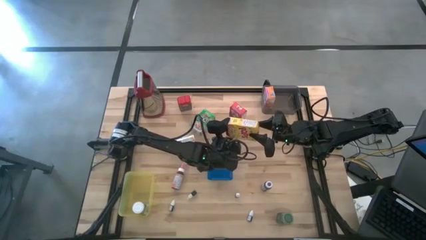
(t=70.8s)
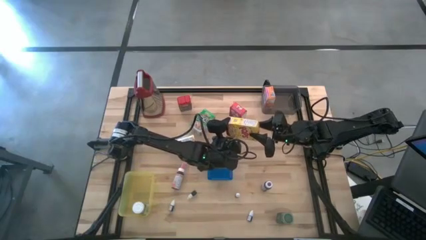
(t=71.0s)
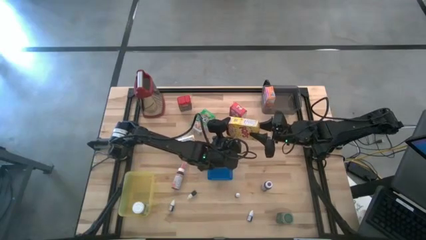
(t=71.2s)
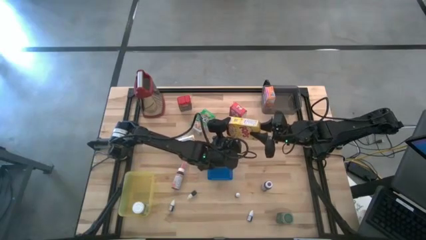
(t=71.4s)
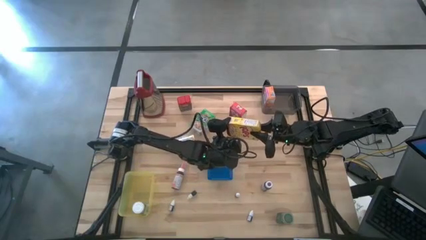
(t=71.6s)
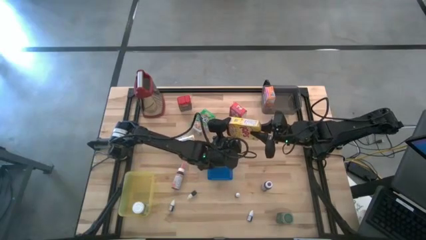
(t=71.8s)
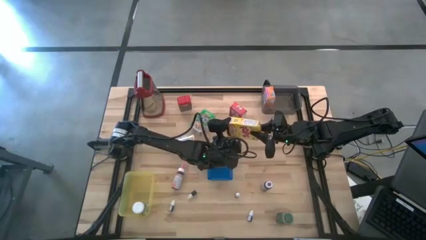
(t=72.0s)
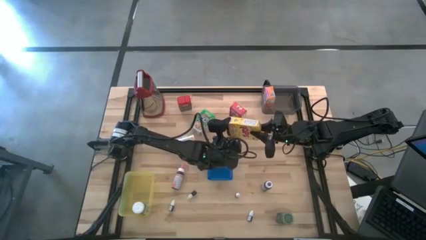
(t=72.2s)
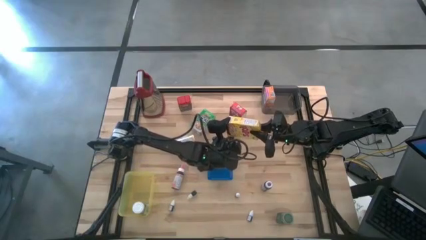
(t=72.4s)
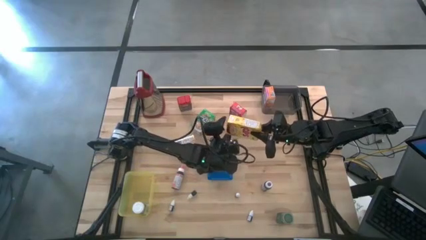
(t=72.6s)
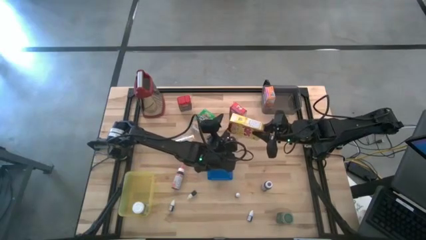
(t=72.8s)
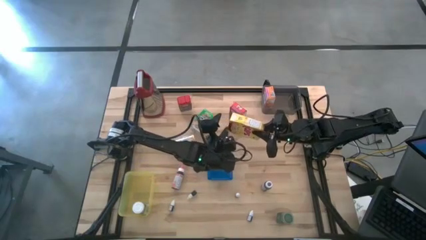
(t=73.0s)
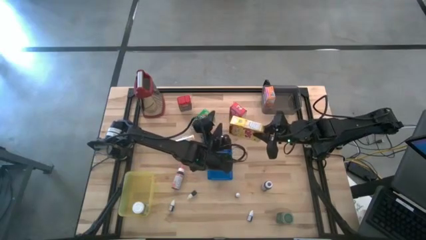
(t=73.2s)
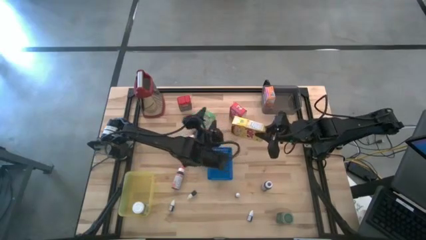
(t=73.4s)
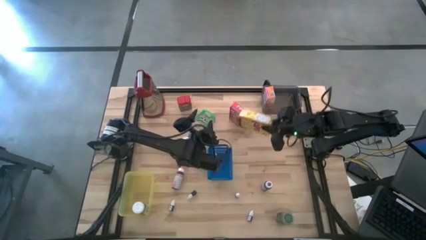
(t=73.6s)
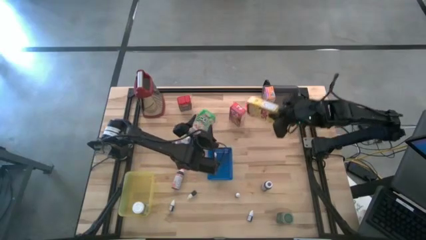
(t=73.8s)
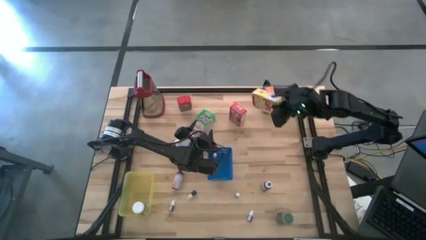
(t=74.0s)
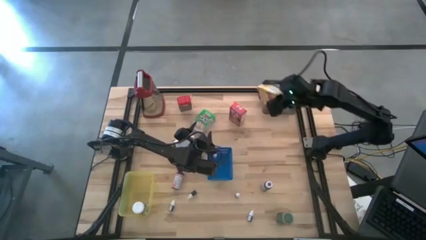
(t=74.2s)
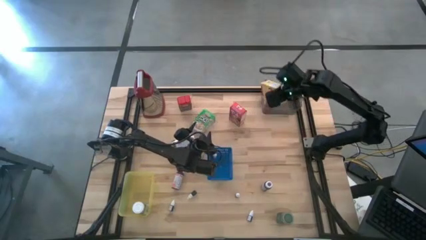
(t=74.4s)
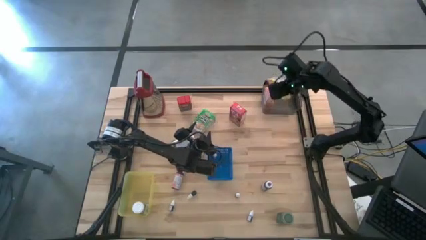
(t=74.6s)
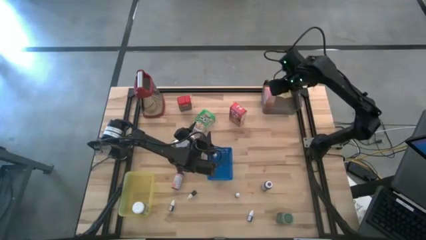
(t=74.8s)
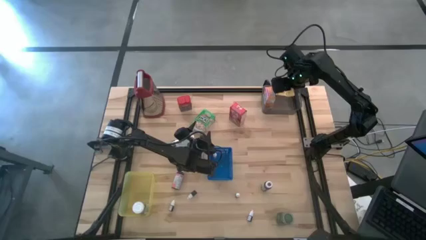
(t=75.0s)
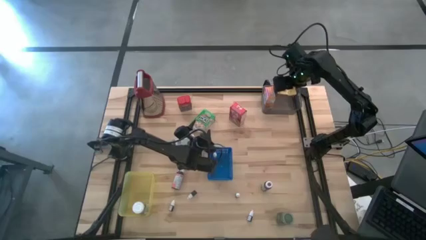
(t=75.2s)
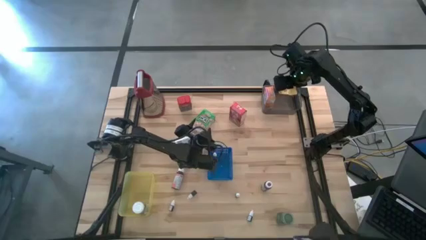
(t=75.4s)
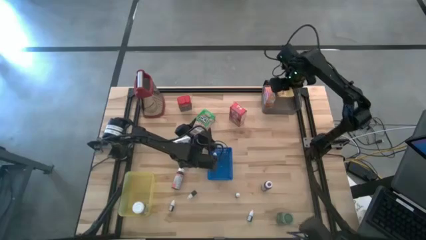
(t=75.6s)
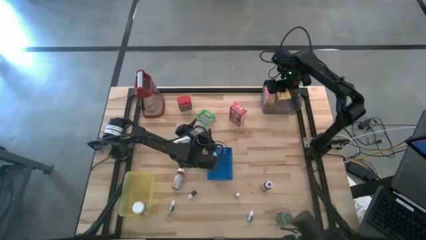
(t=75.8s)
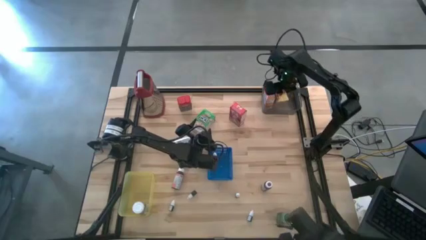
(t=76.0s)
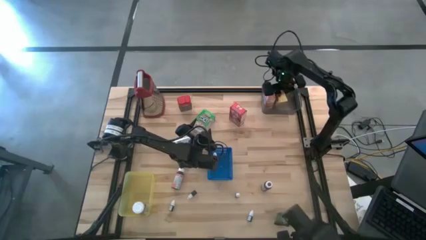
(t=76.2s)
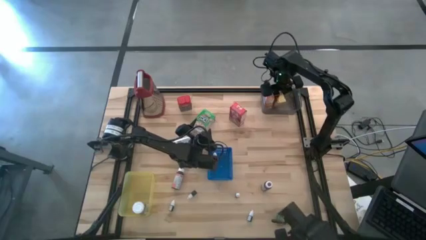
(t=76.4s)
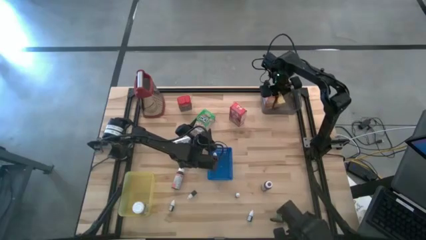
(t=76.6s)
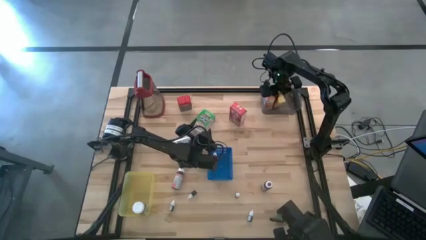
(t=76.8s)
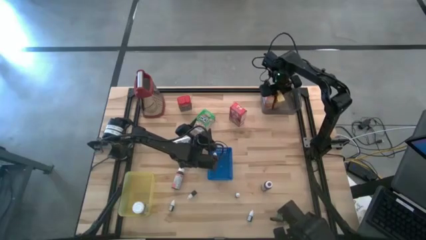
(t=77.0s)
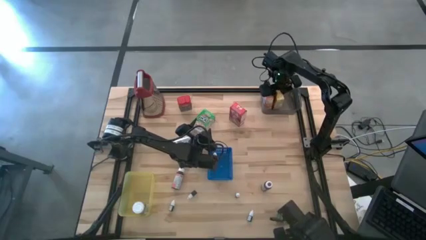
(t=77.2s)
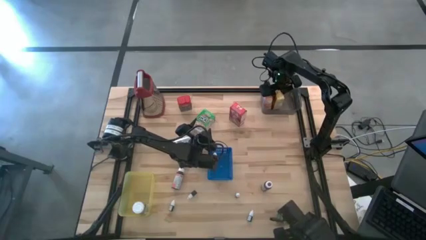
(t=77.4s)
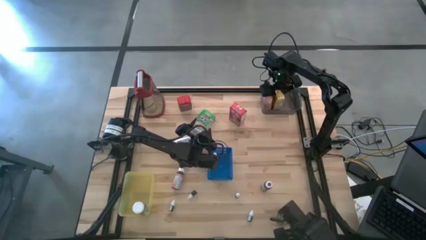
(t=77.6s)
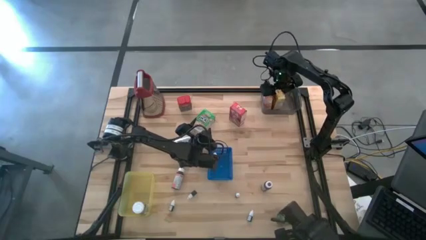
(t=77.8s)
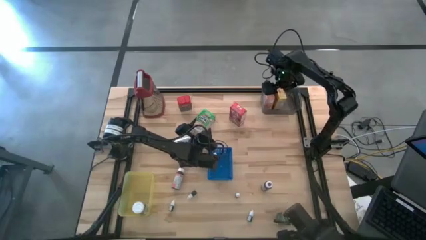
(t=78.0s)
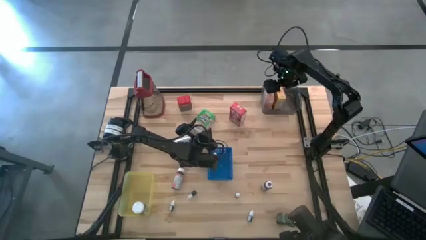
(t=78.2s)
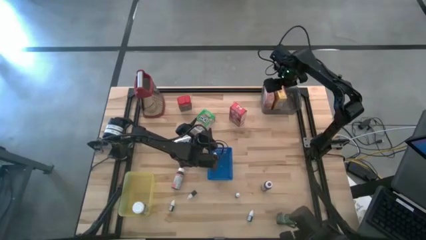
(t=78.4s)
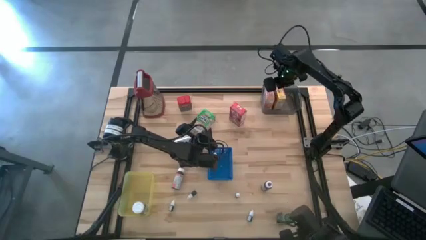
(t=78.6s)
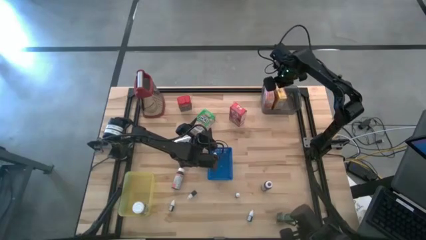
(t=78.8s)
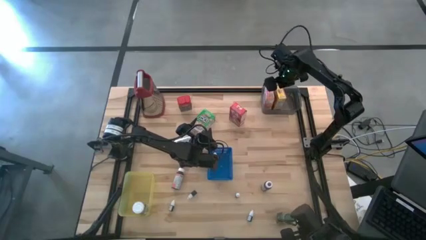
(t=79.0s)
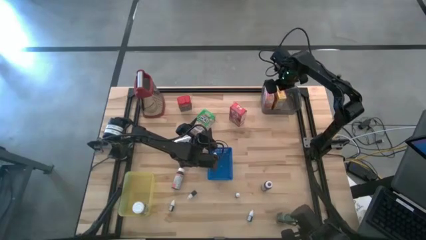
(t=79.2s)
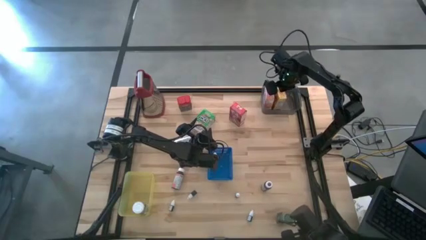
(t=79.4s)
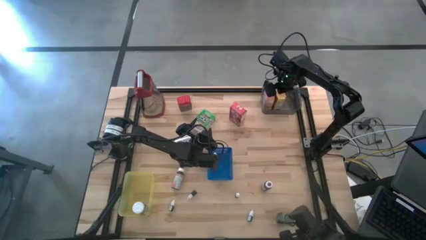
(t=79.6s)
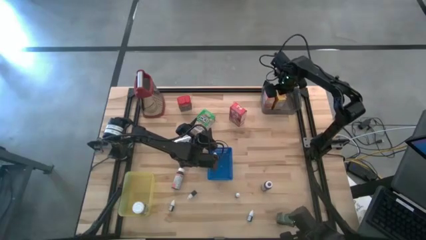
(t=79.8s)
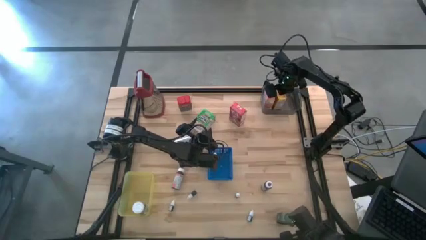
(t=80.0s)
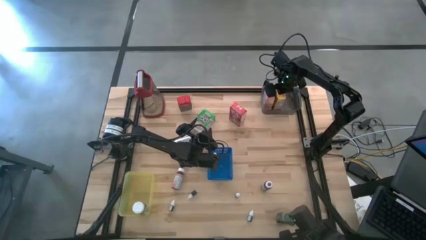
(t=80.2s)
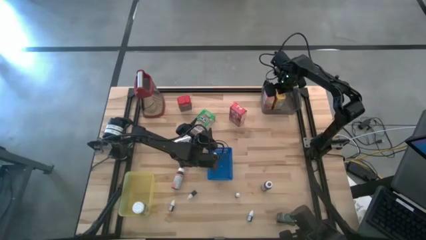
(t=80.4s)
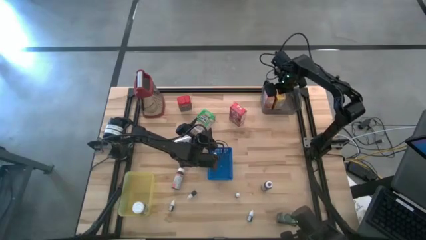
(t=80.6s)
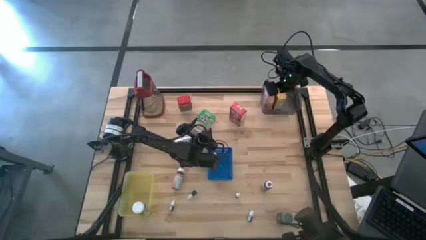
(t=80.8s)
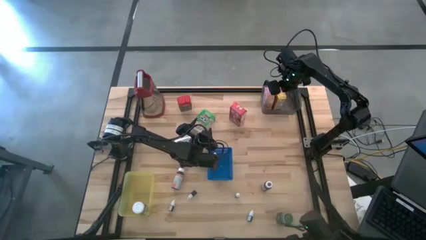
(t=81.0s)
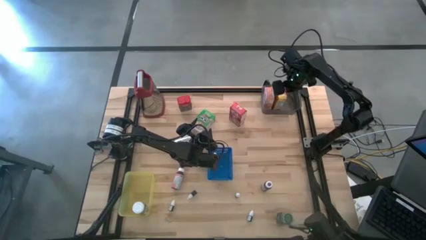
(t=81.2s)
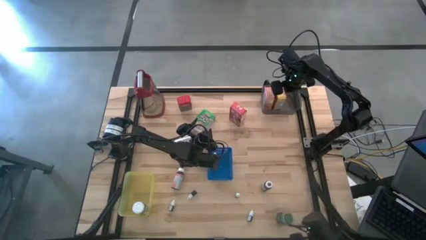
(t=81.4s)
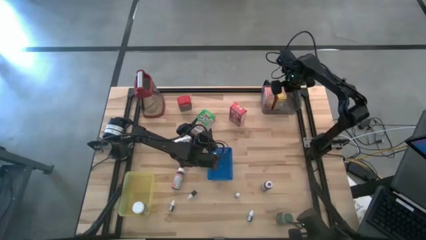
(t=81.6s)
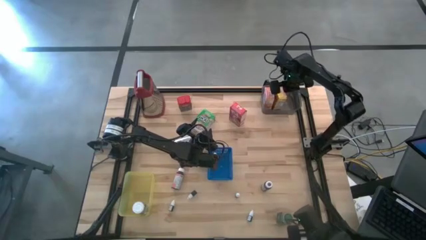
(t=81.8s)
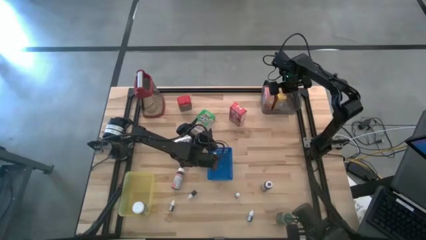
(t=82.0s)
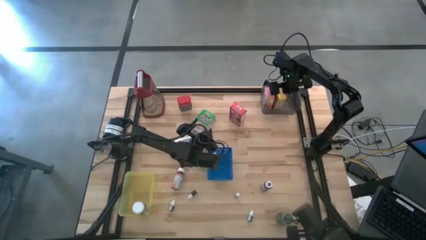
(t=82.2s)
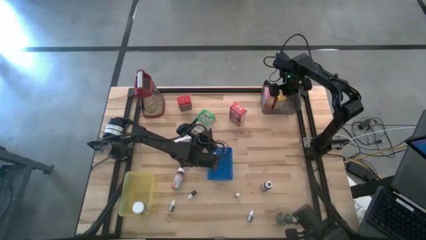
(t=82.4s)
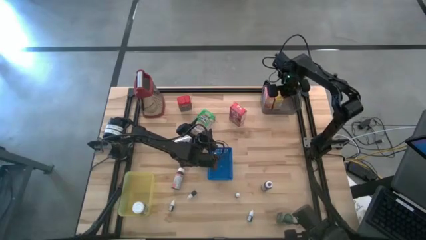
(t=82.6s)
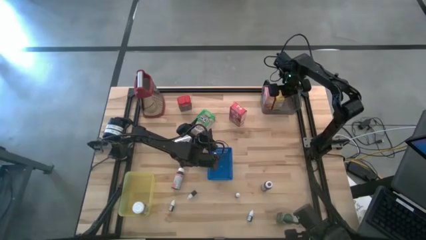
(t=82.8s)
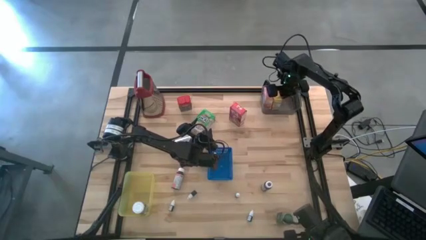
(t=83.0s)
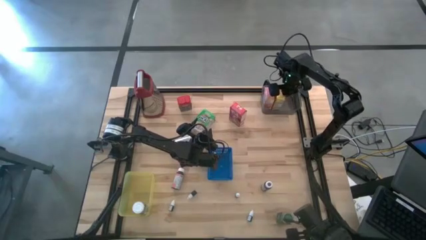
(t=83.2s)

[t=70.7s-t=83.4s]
Task: Pick & Place Kitchen Items
Put the yellow cereal box into the black bin
